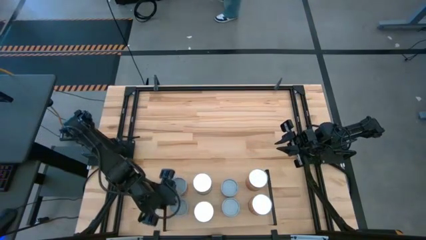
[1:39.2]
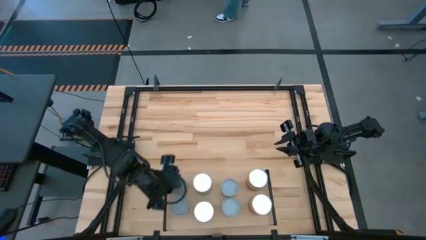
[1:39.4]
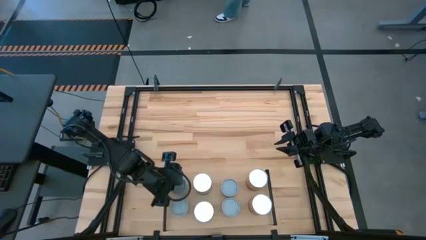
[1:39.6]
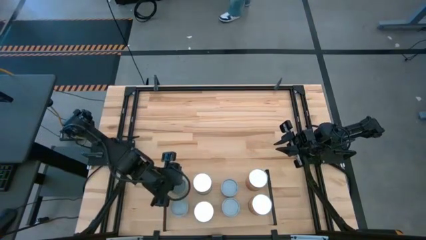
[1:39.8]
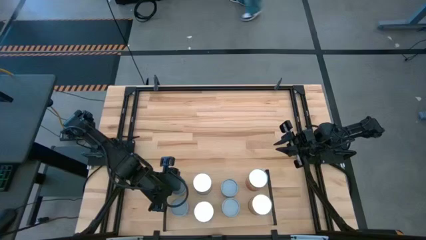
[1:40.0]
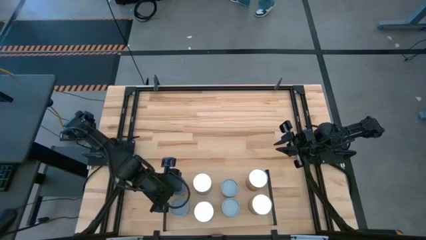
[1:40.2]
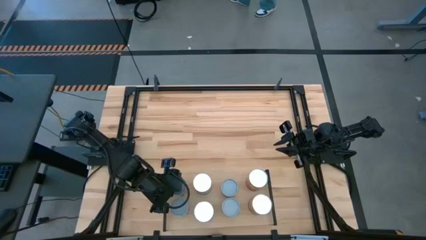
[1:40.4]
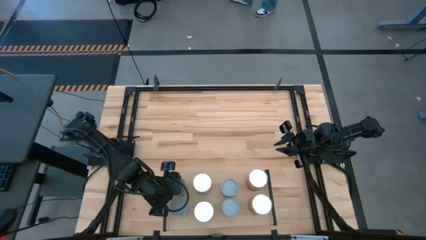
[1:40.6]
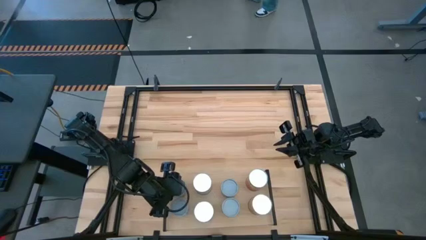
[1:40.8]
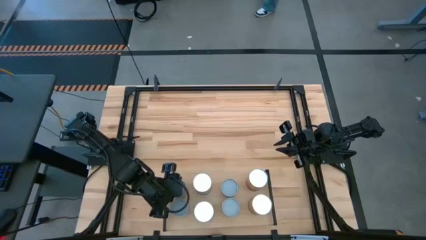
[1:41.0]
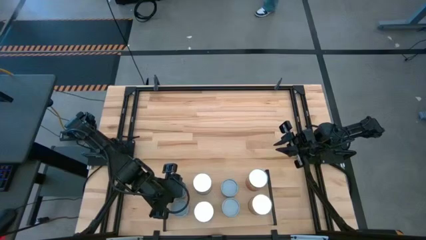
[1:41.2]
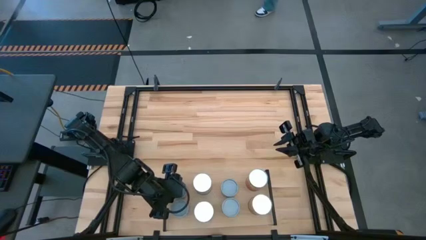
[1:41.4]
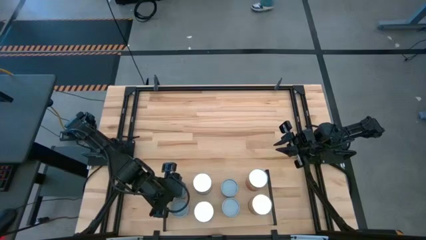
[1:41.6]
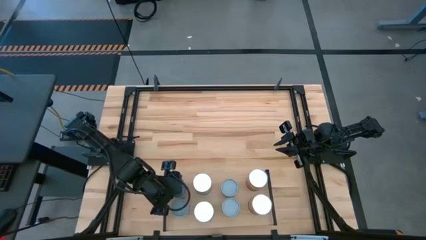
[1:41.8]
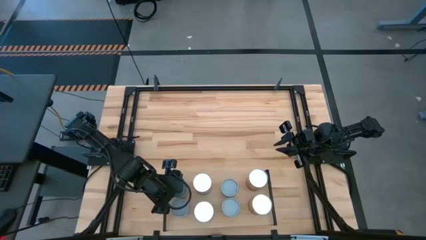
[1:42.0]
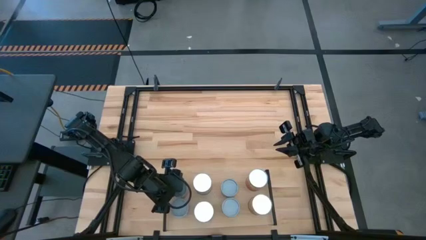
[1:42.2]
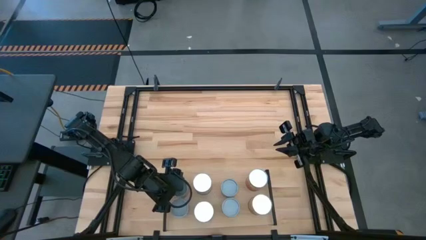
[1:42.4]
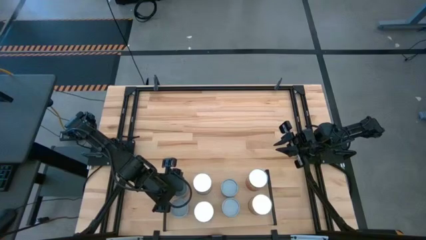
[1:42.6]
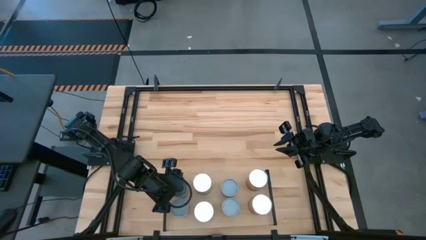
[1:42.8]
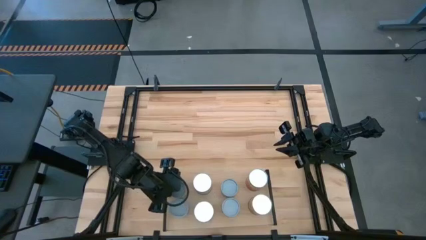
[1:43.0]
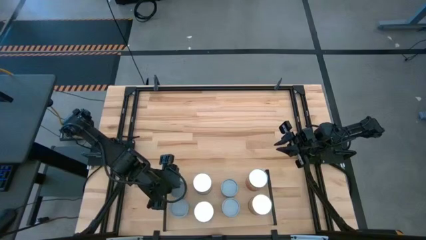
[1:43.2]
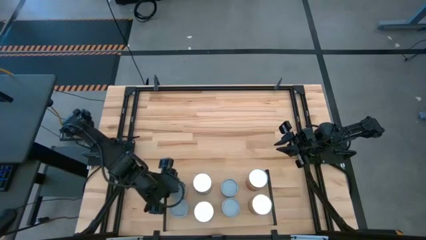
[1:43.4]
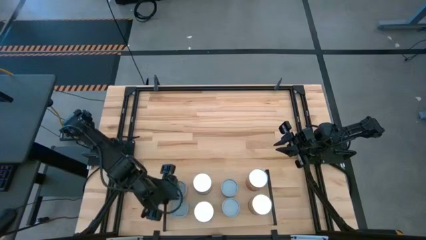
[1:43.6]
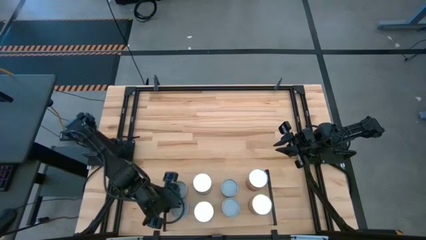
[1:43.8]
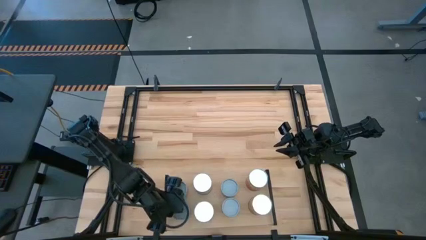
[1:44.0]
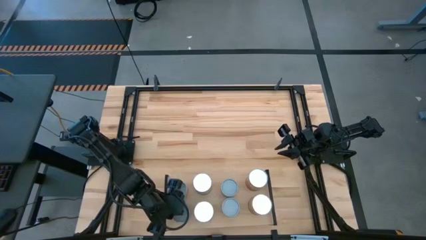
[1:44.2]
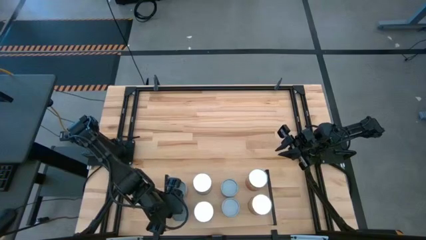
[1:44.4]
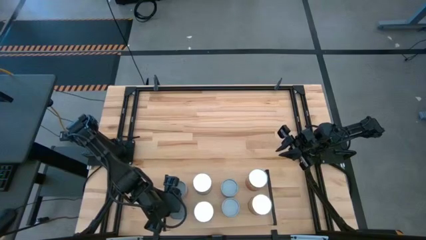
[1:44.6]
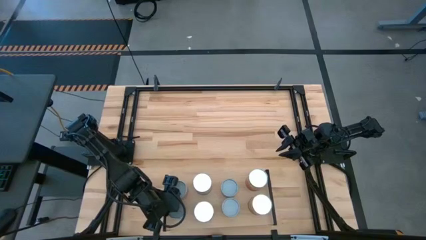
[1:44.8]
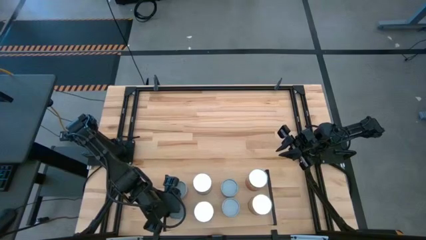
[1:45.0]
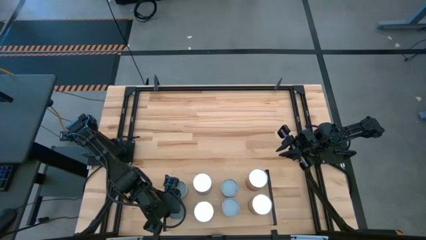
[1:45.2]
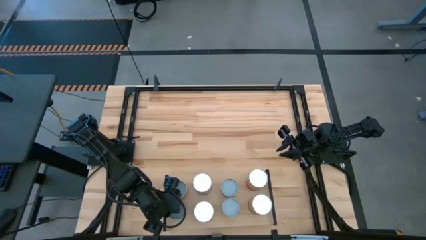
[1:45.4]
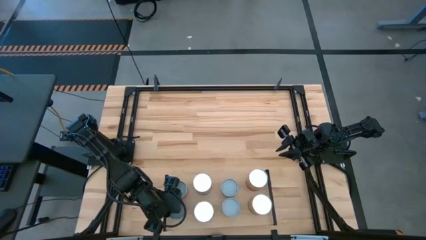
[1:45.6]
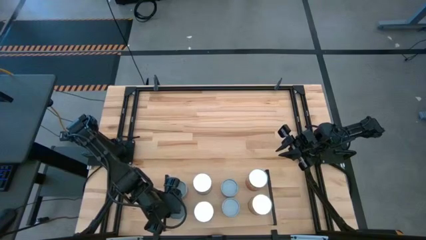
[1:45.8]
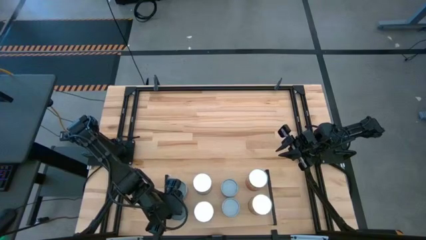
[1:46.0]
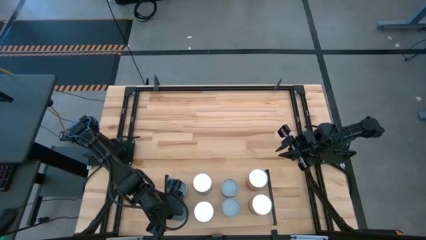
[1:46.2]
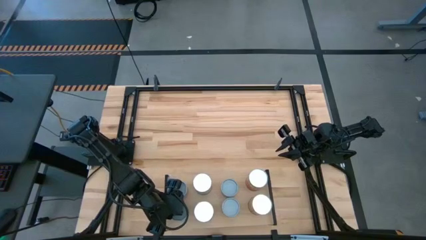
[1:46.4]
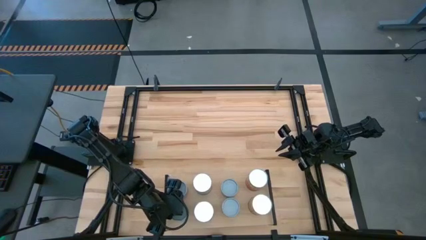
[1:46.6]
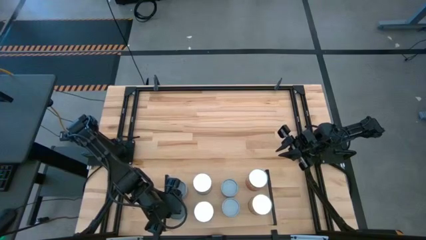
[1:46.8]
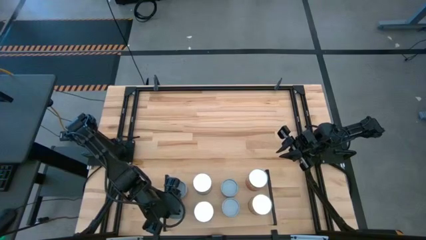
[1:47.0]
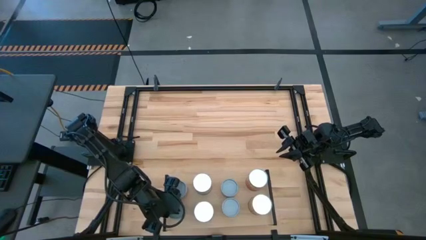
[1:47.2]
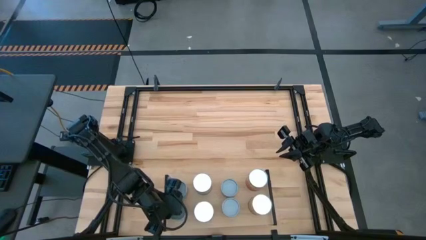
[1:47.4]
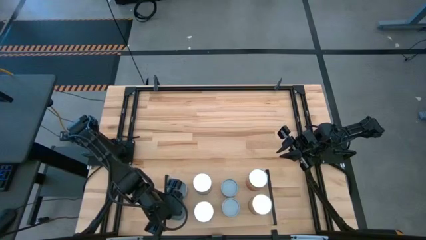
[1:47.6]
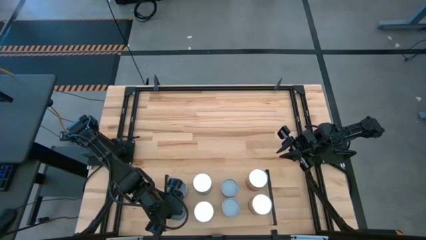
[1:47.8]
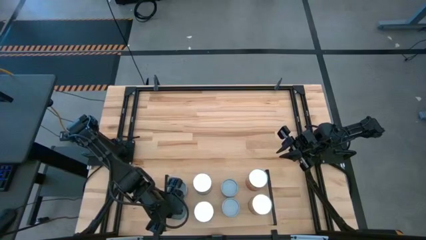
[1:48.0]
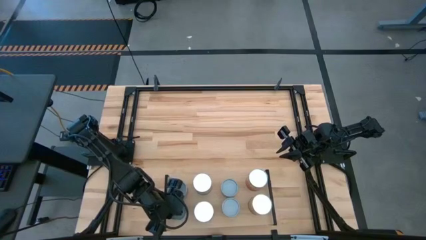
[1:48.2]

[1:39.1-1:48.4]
Task: Pick and place cans onto a shelf
Adjust the small canned orange and carrot on the shelf

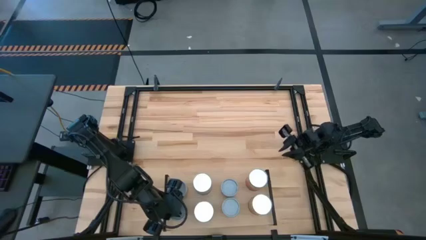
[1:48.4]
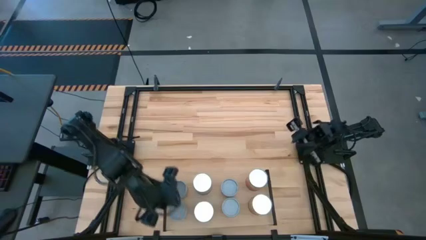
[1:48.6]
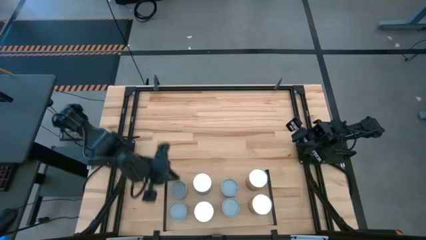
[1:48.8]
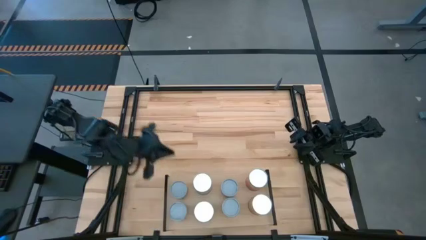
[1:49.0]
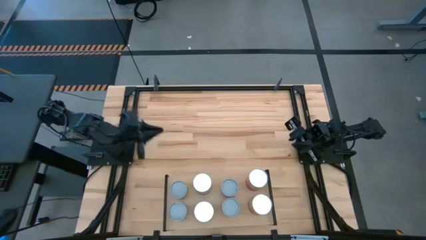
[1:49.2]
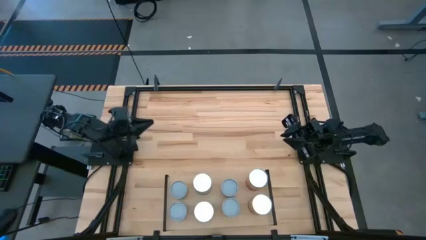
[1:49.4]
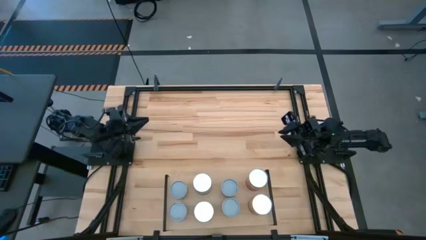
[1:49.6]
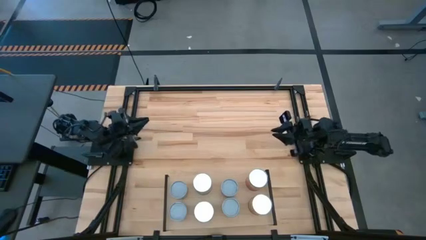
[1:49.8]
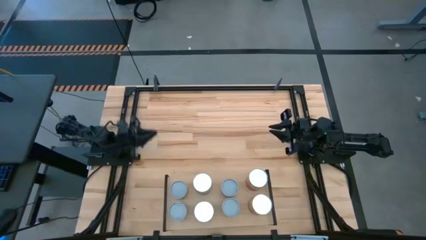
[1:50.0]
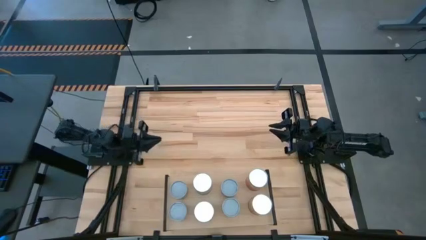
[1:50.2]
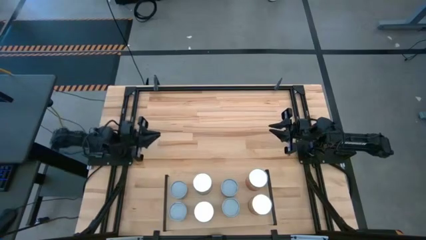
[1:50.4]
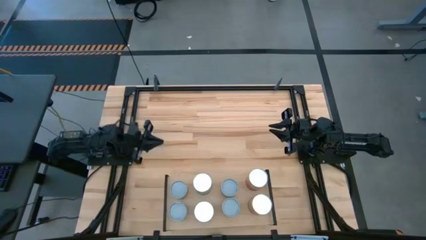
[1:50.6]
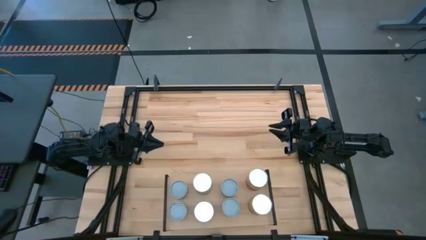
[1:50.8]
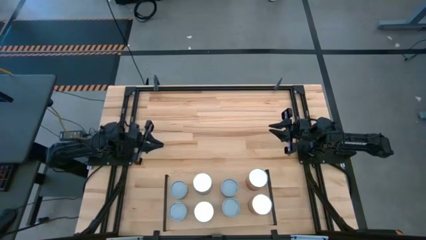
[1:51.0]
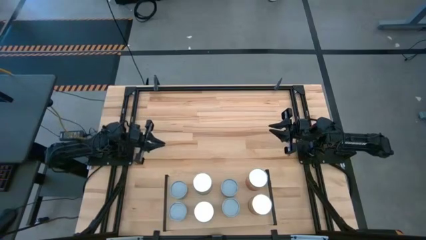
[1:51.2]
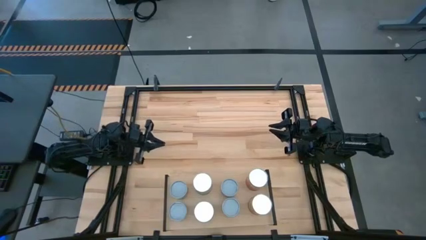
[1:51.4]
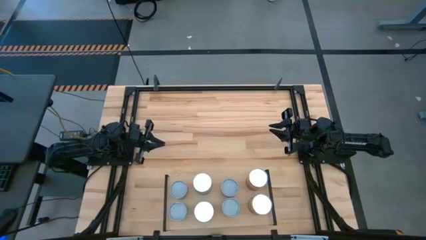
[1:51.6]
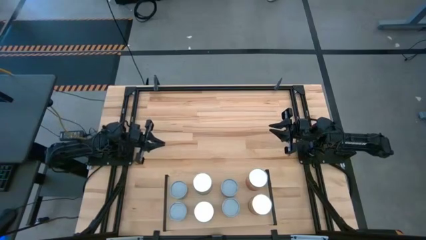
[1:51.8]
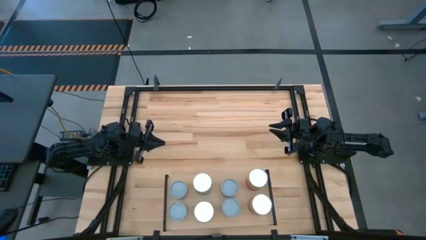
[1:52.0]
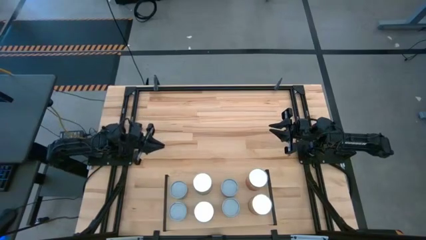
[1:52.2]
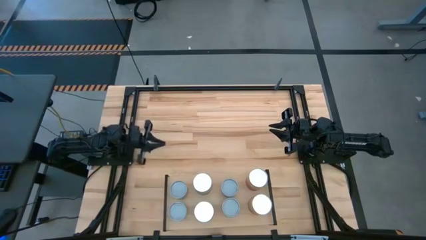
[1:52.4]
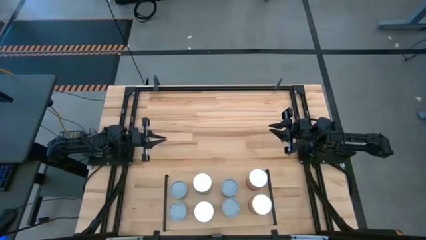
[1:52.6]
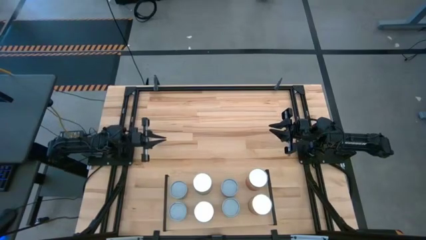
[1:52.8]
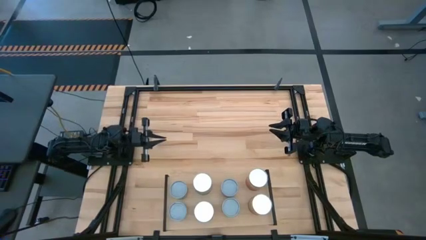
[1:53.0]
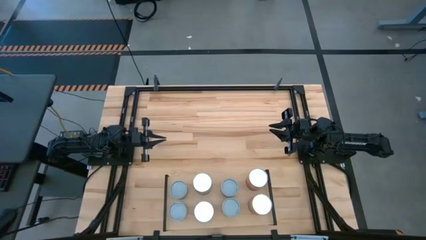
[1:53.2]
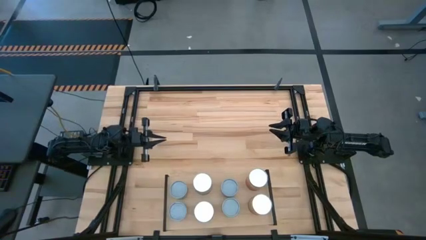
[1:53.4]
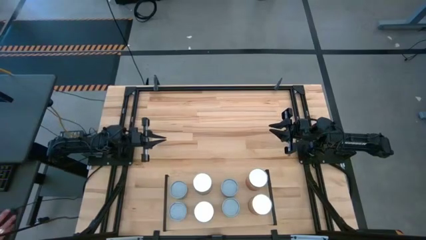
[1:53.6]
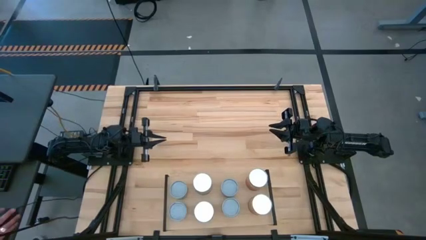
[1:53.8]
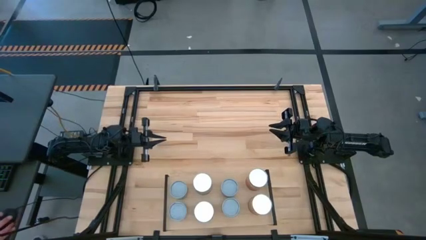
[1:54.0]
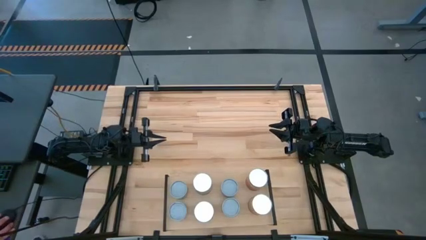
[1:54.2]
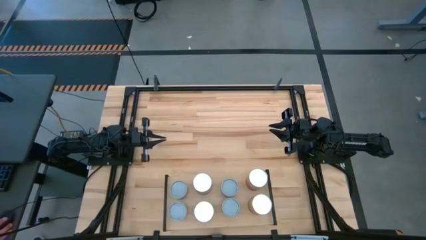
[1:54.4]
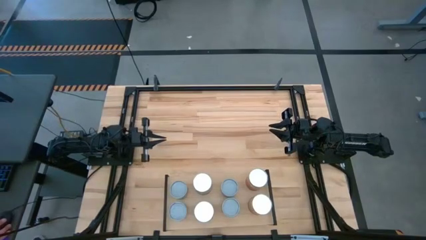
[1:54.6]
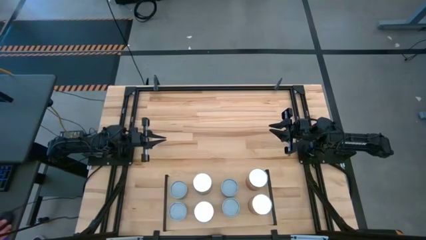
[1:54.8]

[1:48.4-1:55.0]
Return to Home Position
